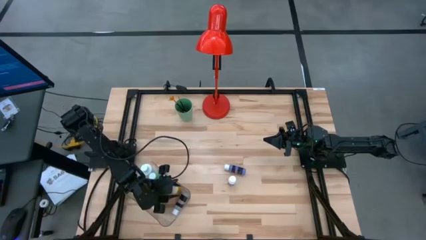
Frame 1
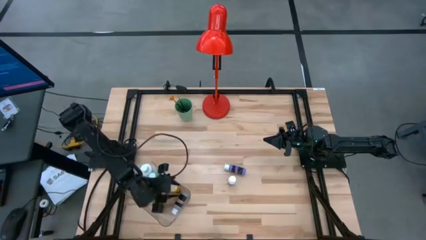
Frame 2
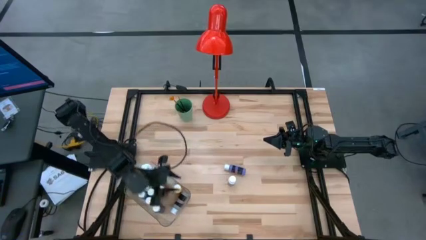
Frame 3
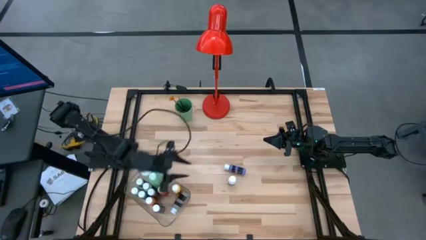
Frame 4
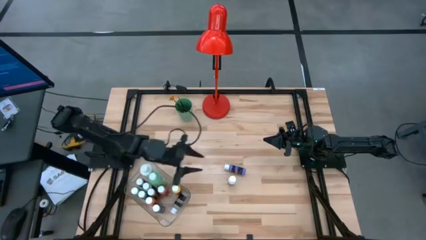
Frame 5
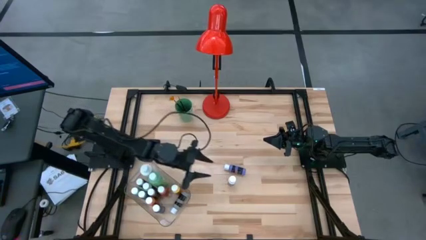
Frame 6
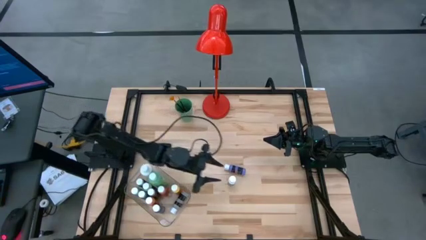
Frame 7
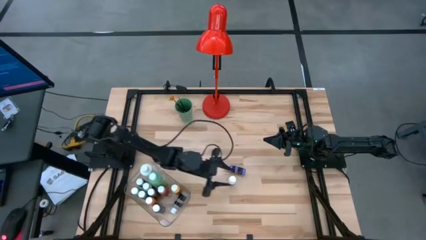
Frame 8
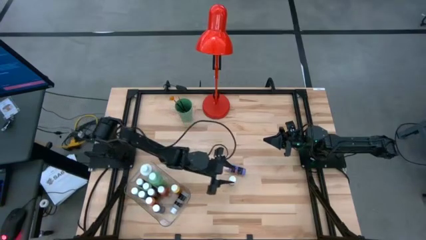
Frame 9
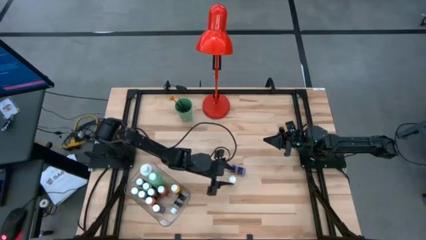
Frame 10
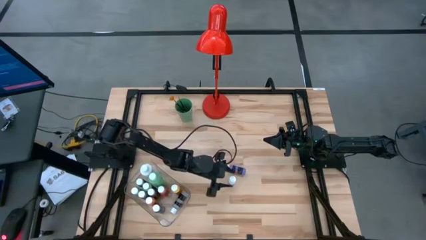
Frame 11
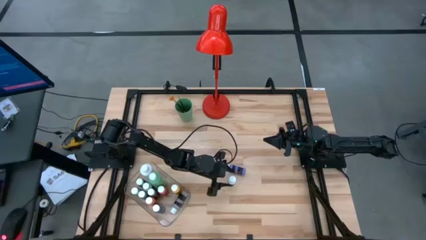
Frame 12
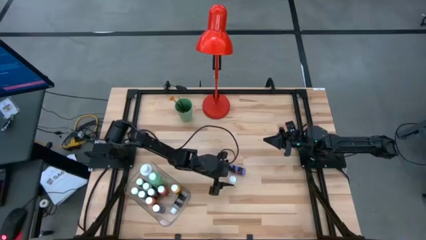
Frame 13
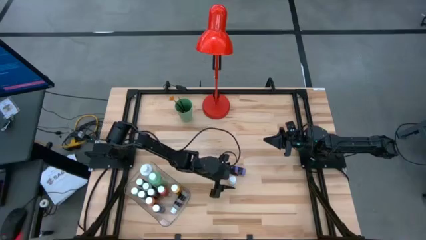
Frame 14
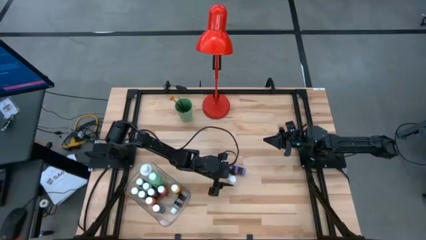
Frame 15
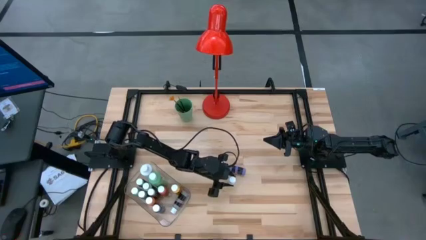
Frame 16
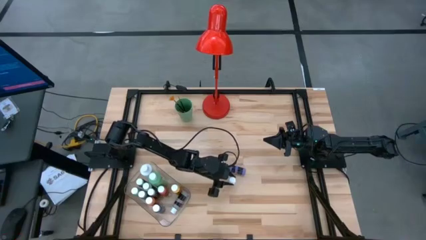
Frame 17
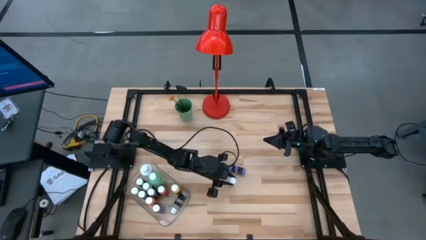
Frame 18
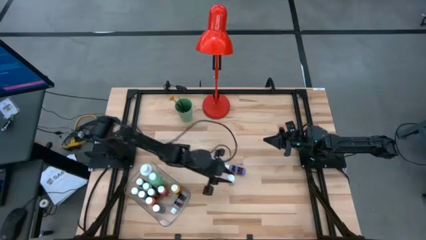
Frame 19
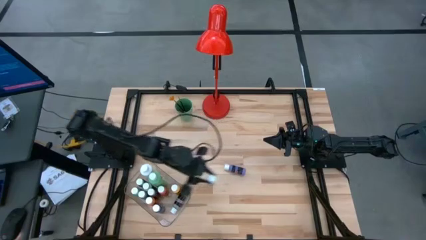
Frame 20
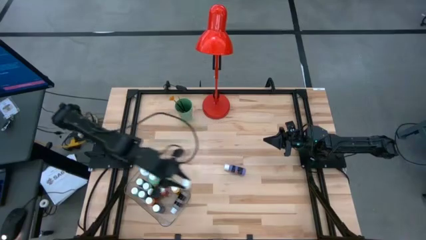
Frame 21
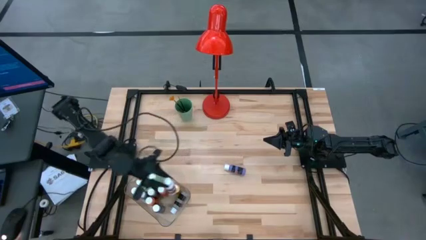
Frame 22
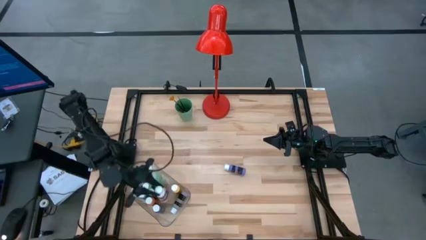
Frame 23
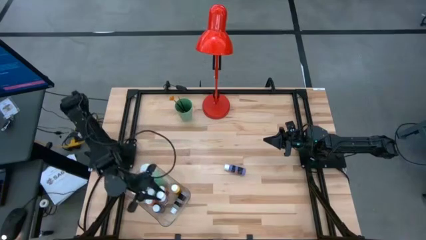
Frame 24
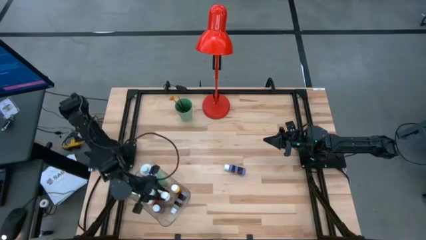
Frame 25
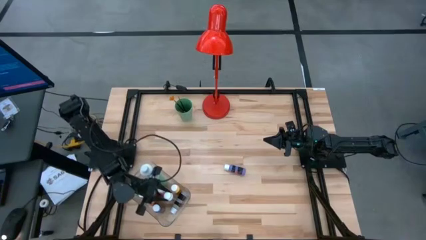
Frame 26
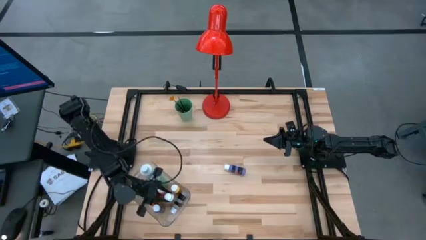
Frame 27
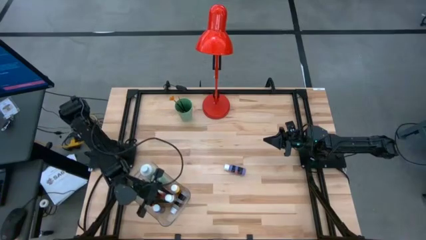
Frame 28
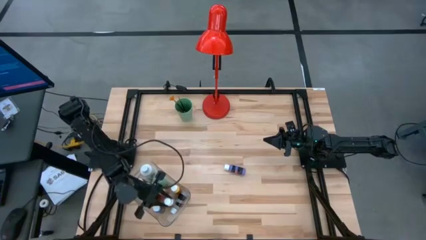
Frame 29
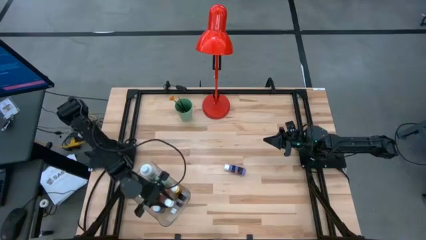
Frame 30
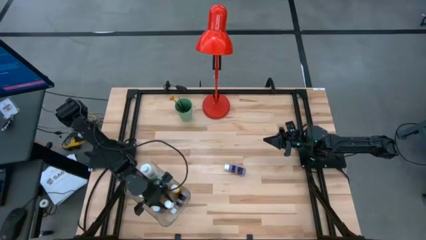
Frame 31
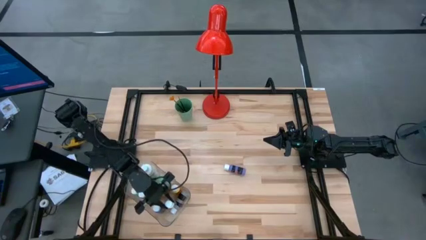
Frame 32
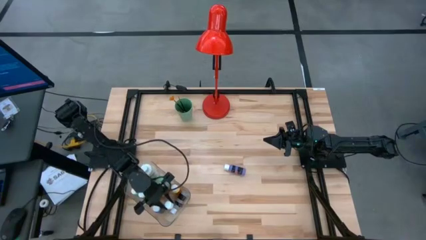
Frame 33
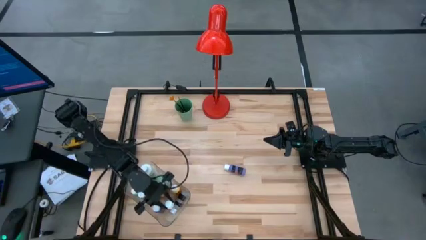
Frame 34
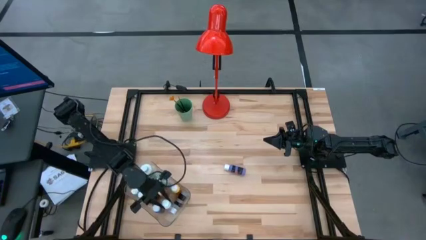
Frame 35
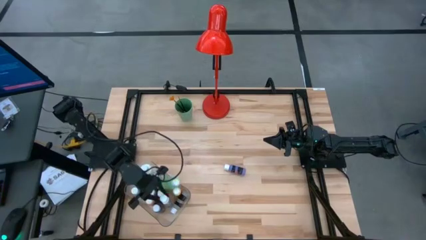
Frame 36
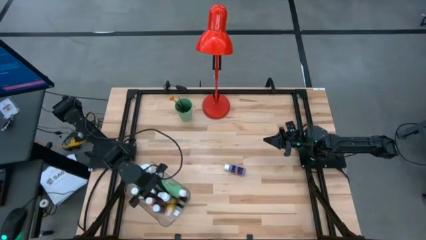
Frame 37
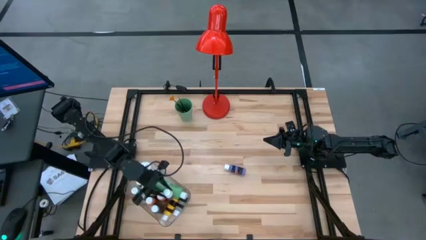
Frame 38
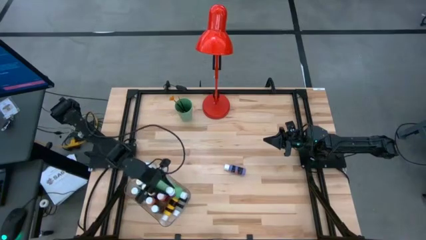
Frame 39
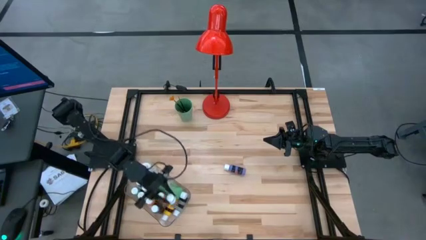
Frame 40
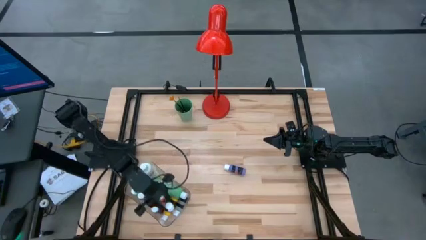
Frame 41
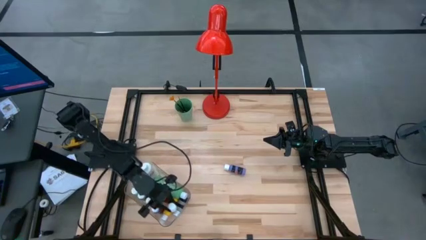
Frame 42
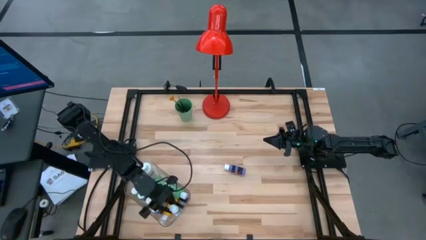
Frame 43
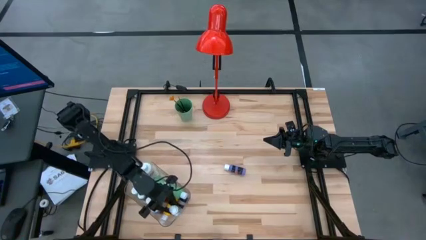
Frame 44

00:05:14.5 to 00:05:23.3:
Task: Pick & Place Paint Supplies
Put the white coloring bottle into the transparent bin

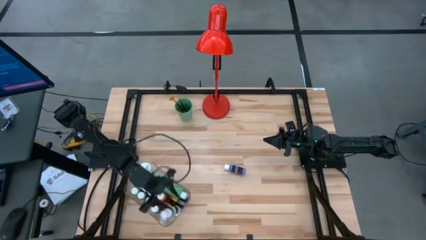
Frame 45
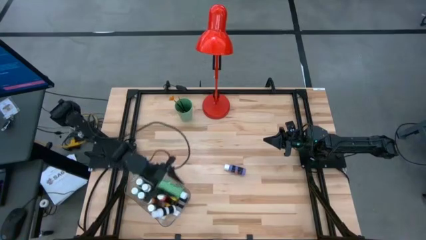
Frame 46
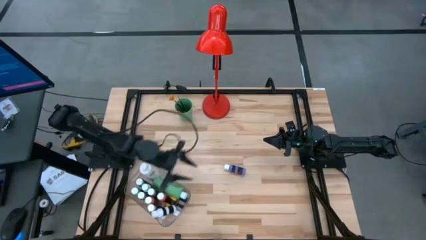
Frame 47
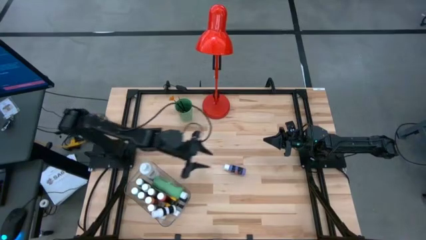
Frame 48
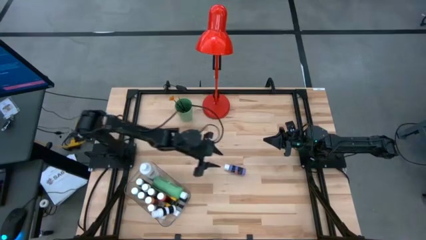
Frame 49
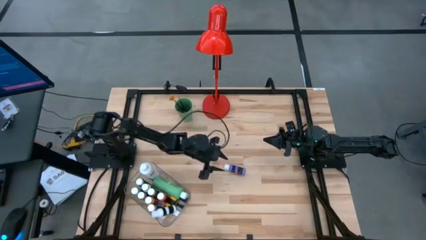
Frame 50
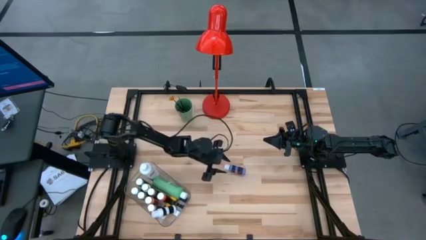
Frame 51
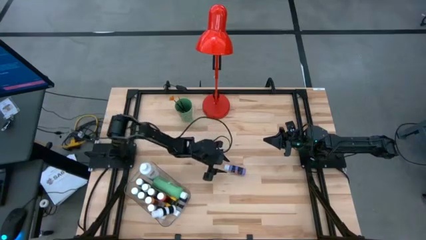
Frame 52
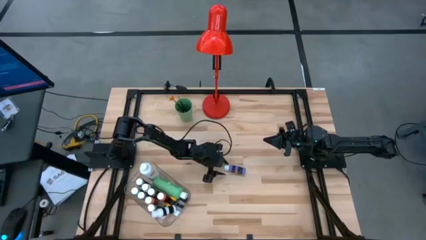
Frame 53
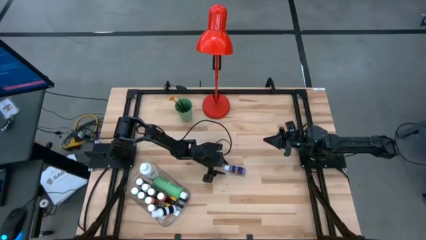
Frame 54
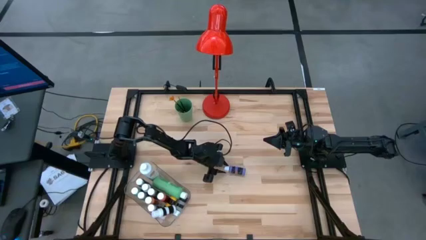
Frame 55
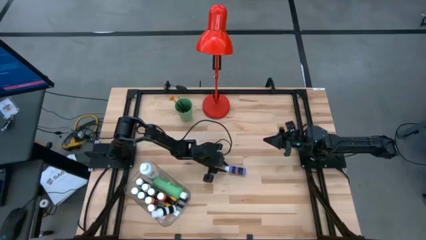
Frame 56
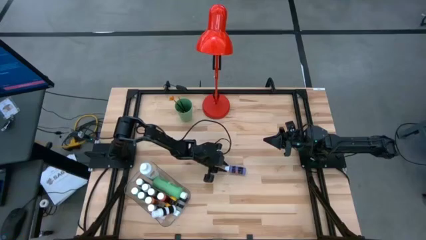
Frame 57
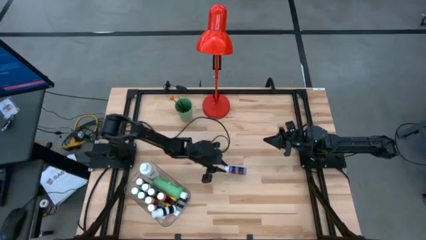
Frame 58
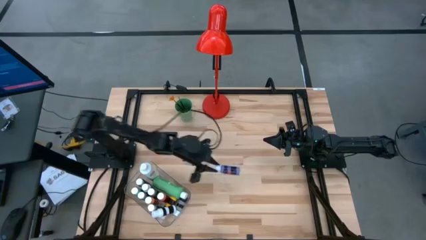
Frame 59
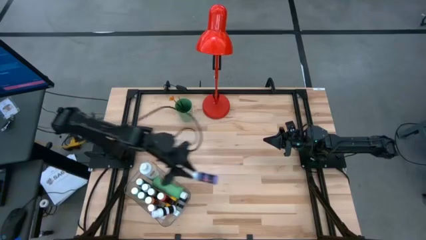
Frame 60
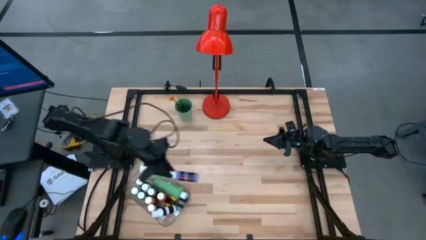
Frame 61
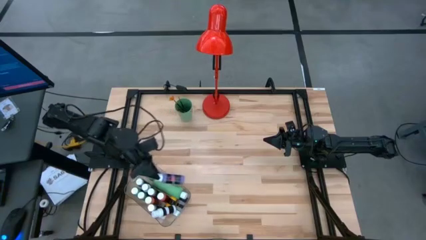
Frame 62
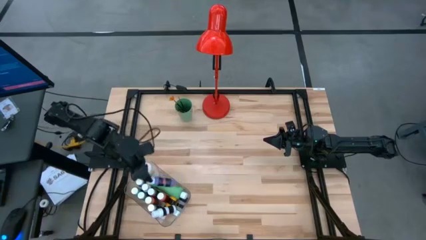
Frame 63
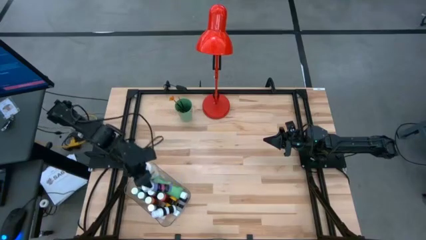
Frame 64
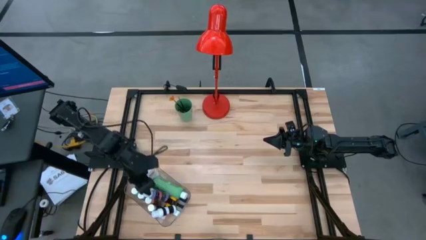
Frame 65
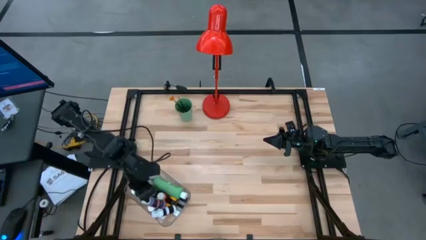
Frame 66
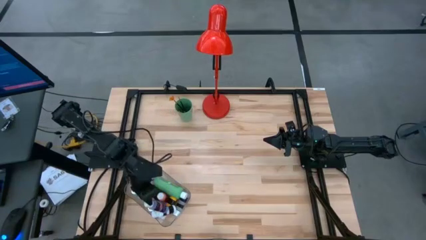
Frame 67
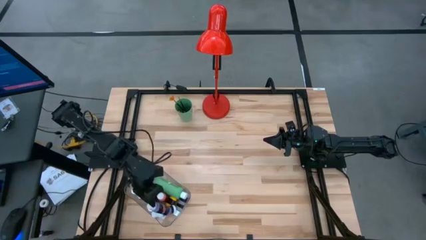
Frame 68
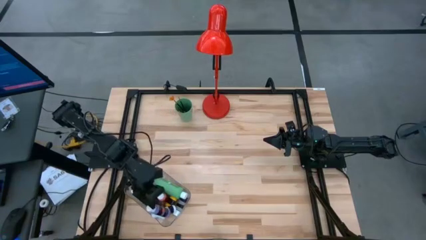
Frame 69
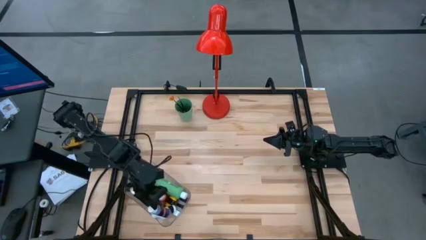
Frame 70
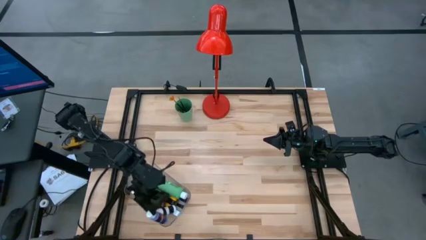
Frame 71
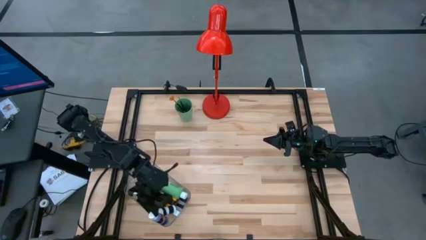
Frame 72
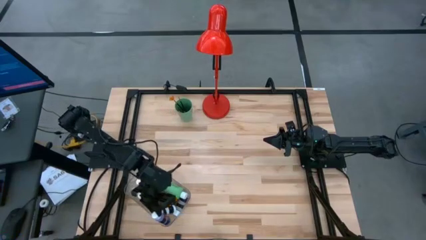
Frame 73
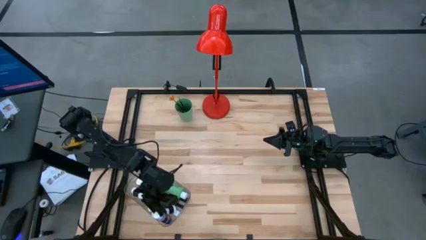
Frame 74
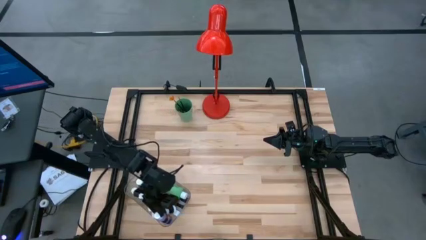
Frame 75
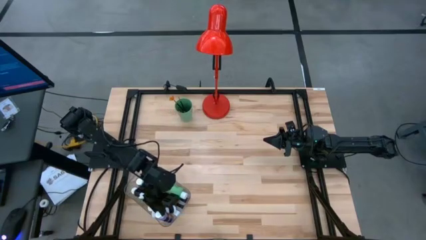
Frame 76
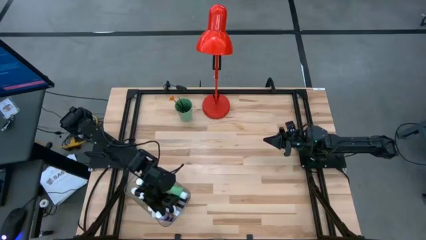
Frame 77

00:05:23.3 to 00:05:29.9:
Put the violet coloring bottle into the transparent bin
